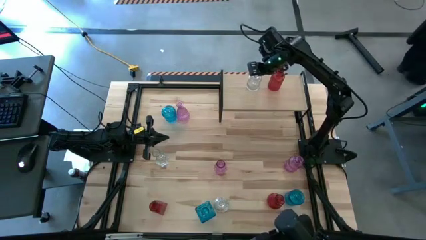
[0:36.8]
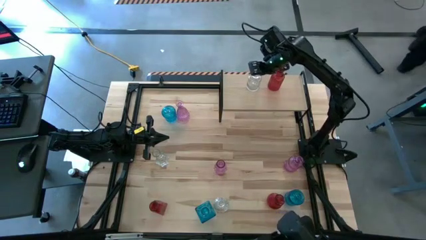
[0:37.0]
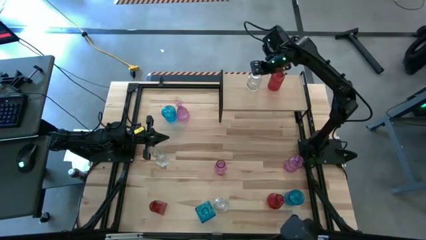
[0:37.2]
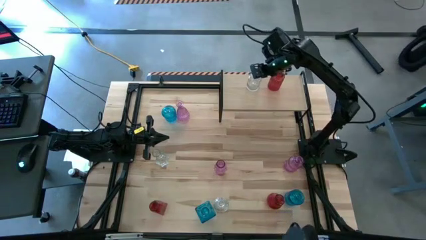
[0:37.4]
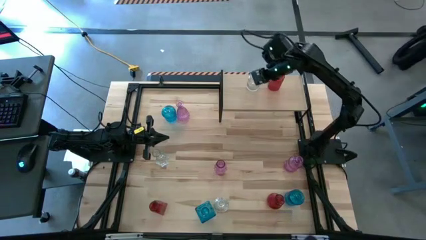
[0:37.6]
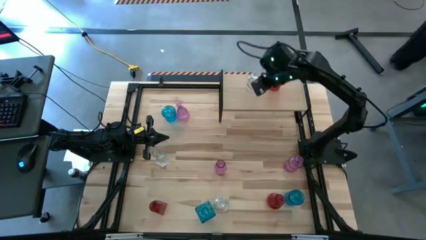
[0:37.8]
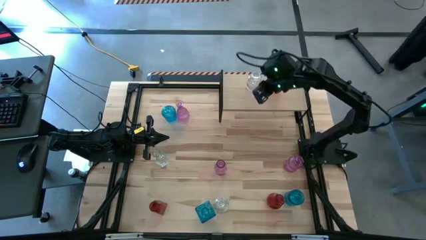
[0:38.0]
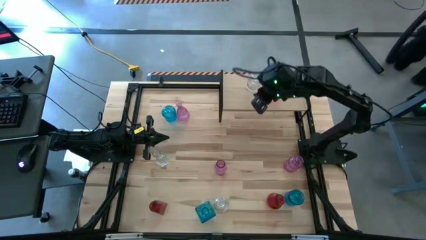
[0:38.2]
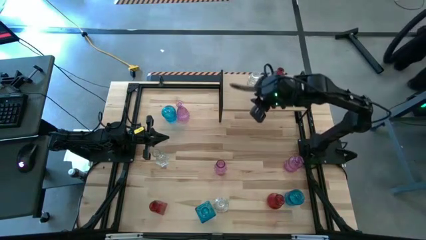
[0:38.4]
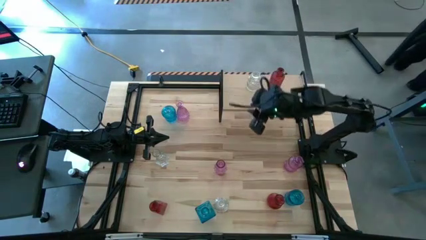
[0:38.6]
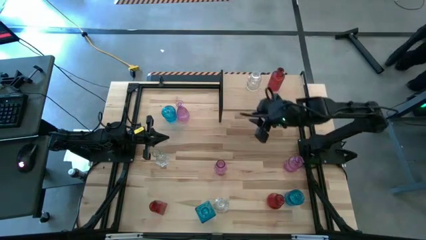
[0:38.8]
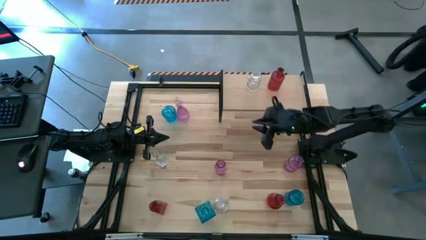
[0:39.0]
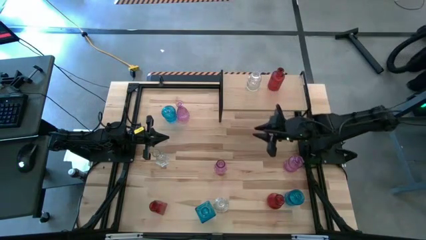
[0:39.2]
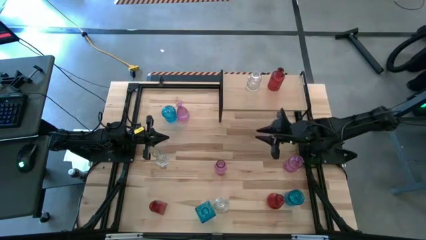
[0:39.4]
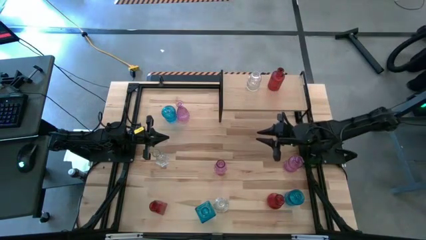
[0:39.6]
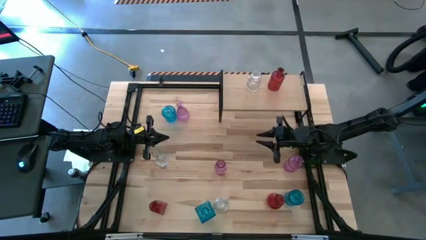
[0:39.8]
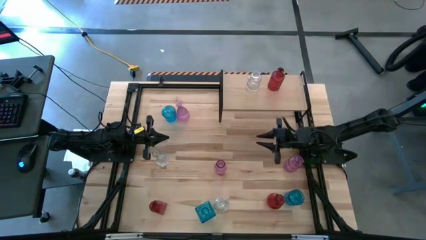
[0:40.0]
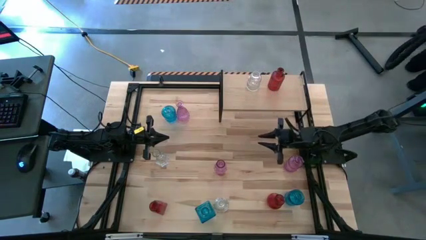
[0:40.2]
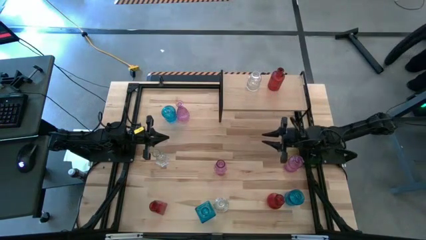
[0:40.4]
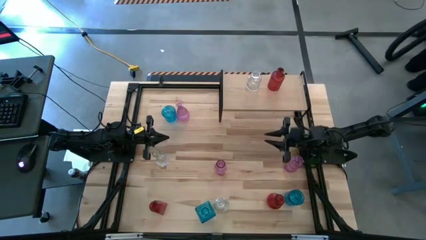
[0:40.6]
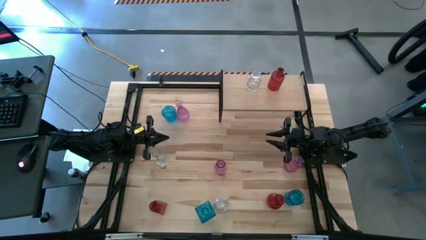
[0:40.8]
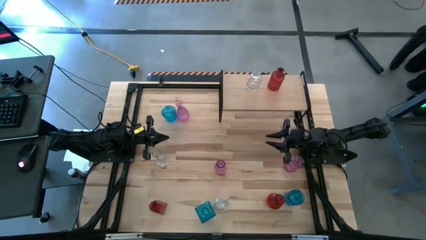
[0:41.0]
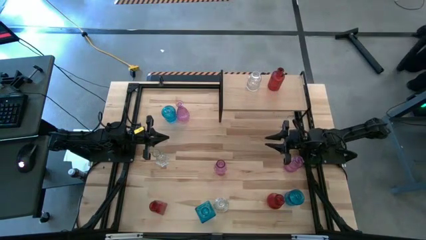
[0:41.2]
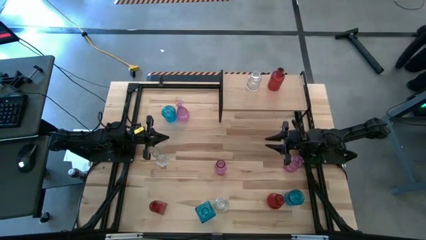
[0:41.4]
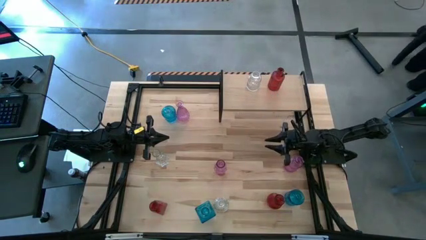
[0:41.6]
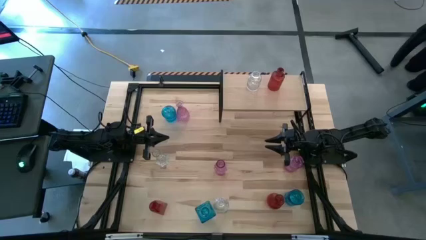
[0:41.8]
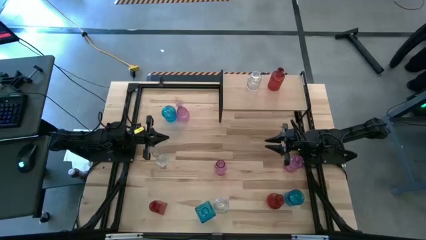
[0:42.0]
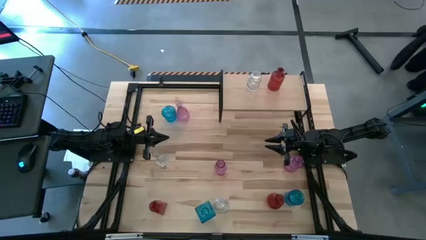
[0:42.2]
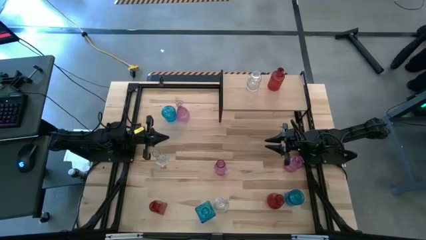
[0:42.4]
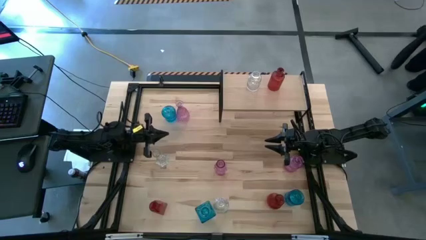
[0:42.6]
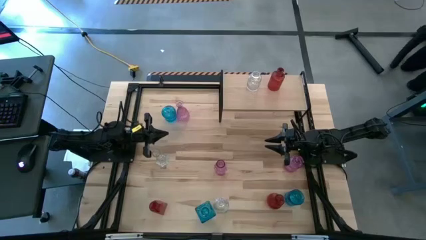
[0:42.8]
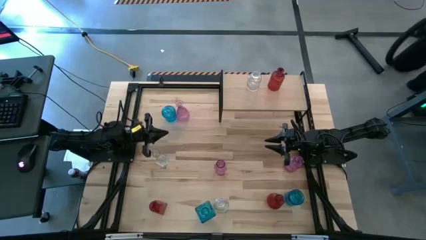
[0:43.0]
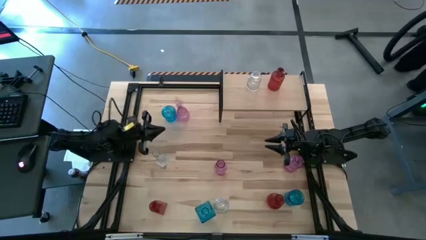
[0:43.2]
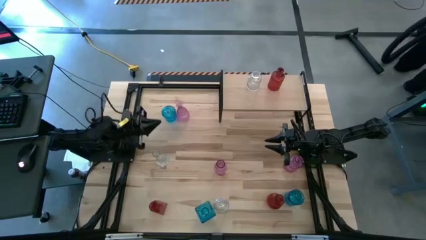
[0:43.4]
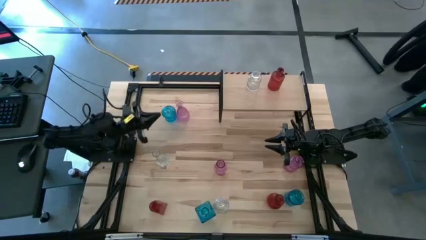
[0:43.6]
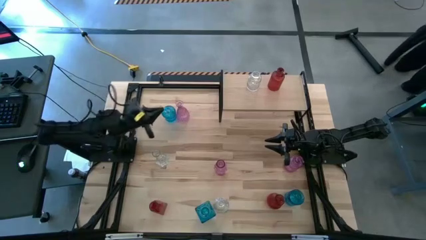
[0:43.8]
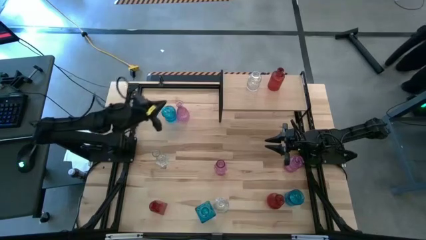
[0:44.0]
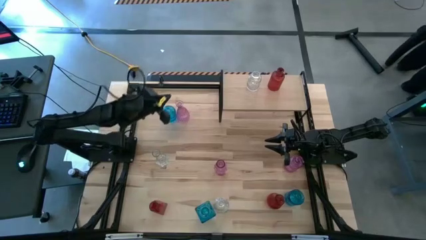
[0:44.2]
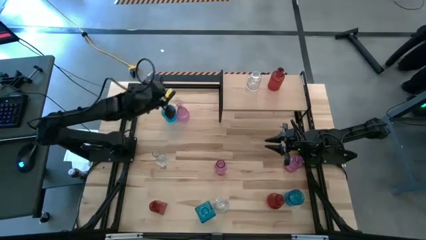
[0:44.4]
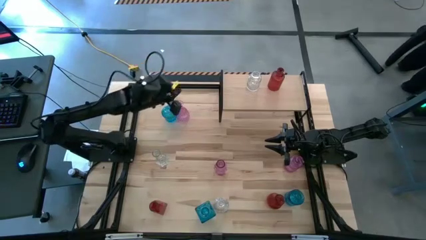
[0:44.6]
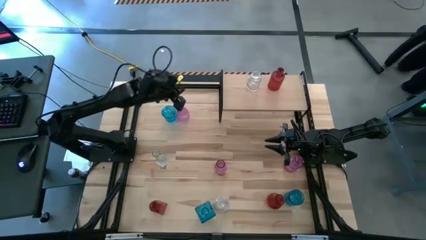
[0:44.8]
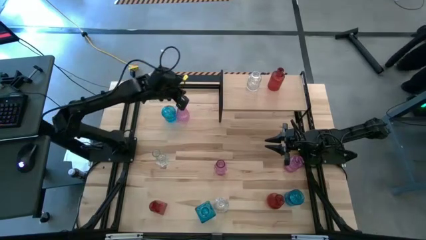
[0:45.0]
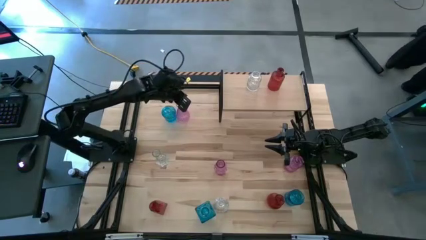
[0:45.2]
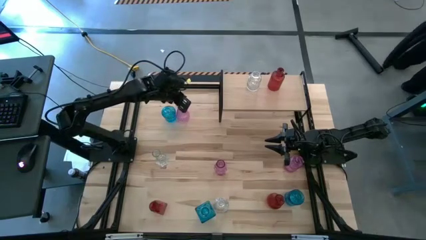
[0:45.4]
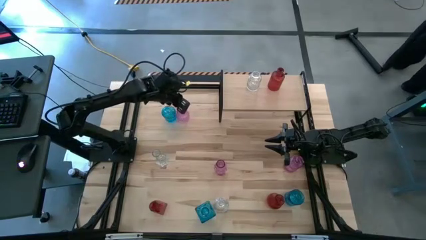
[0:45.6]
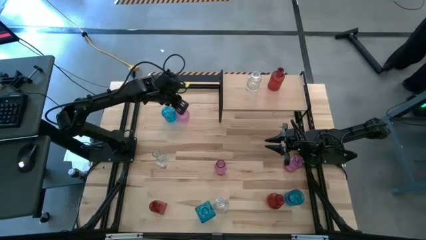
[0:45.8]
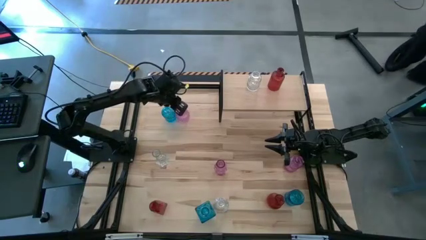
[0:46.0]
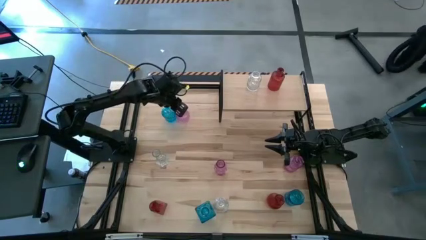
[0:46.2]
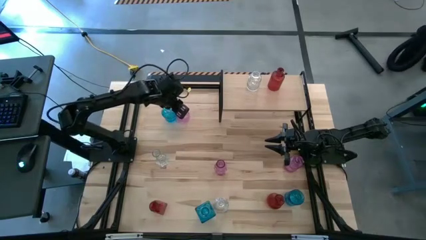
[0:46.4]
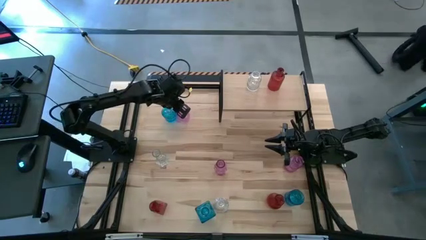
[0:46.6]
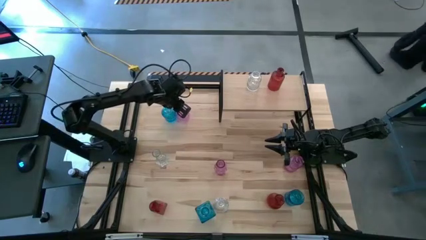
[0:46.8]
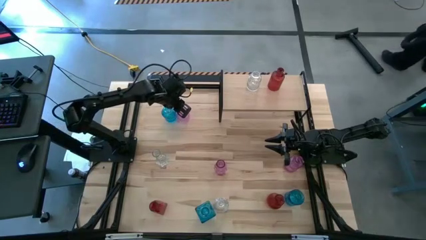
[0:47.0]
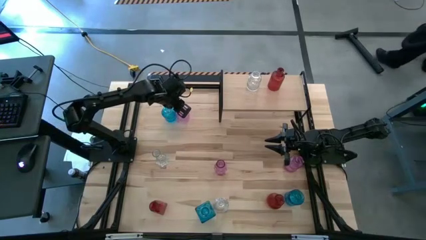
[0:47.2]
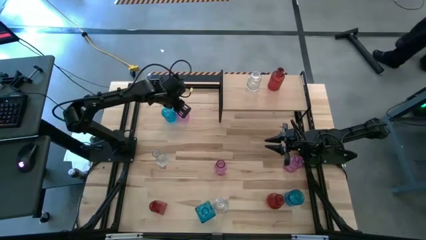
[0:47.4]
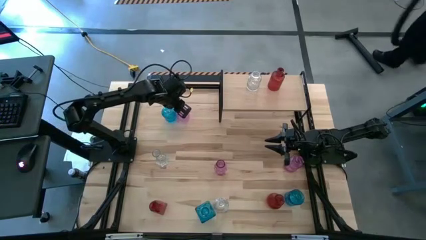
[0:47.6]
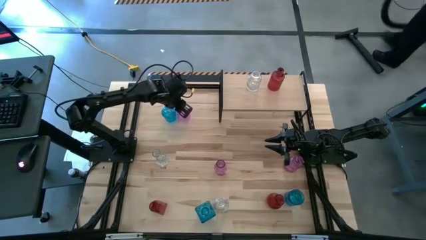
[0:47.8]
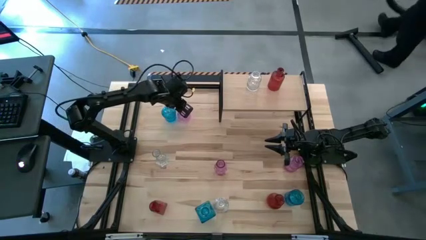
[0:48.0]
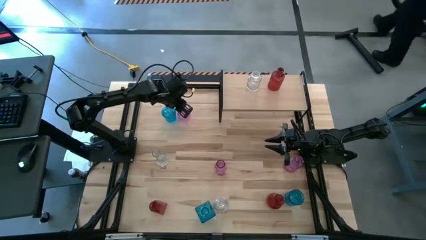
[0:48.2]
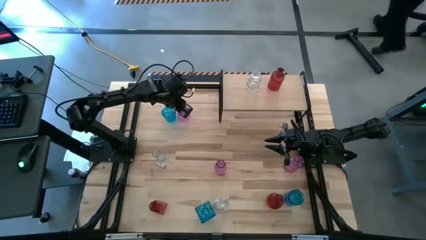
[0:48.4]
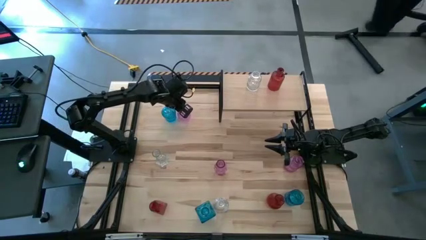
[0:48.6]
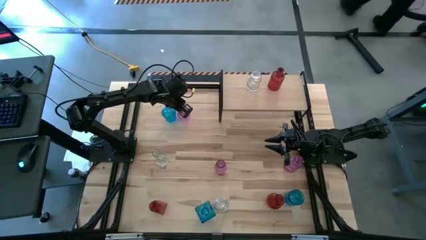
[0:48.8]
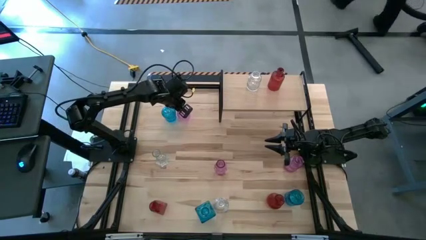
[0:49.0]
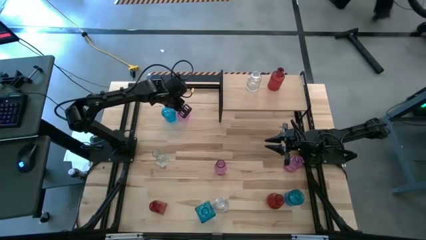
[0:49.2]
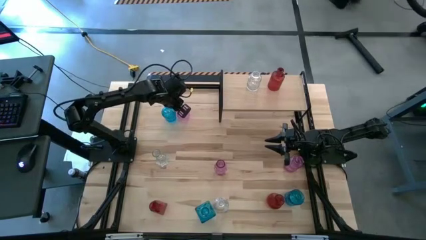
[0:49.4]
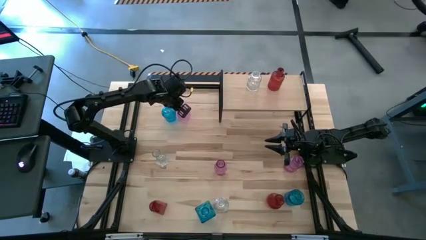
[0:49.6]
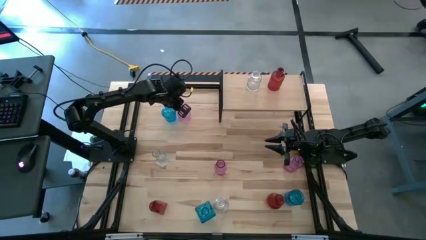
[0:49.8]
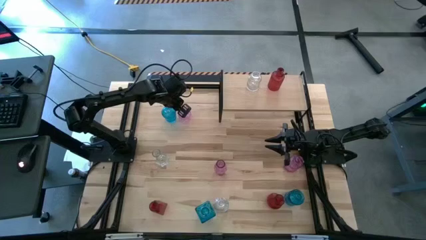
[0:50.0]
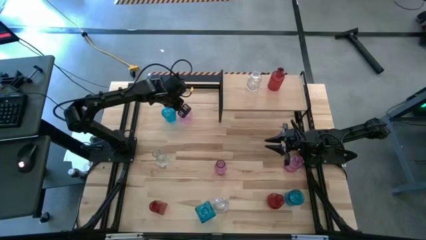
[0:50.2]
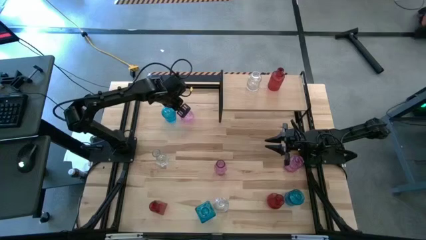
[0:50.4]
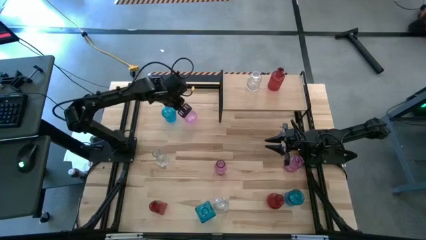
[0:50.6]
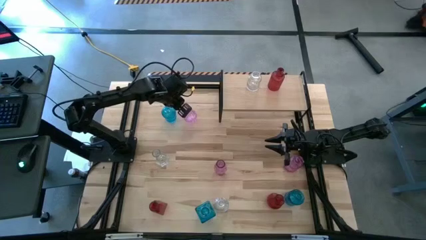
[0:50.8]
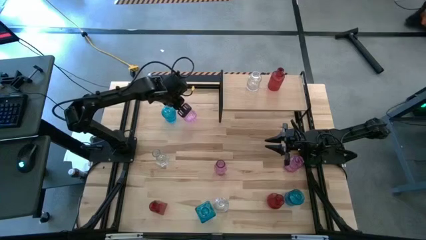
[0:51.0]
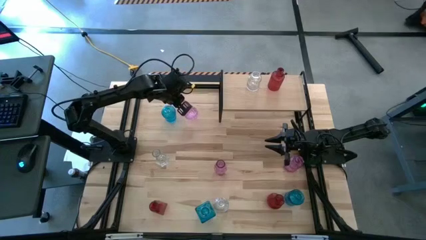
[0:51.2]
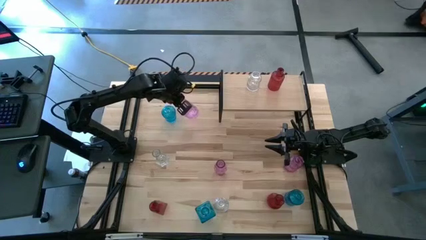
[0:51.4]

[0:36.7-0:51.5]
Task: sort vases onto shelf
Put the top left pink vase on the shelf
